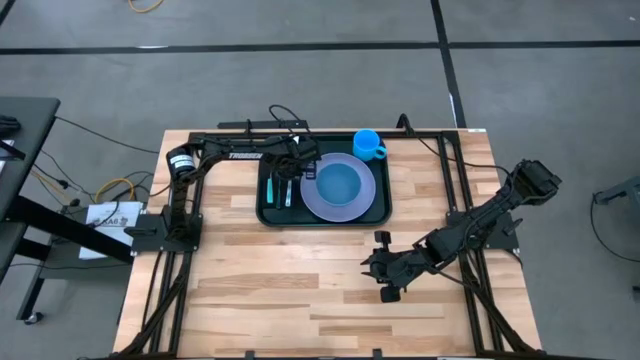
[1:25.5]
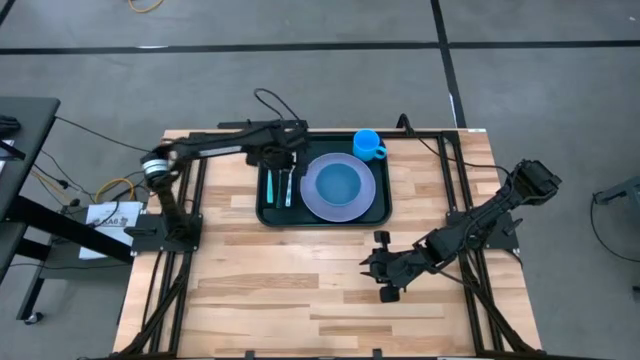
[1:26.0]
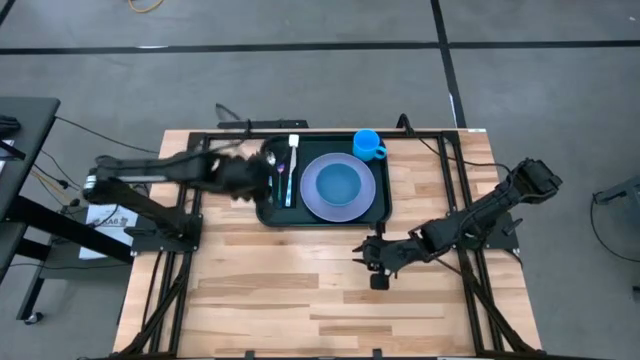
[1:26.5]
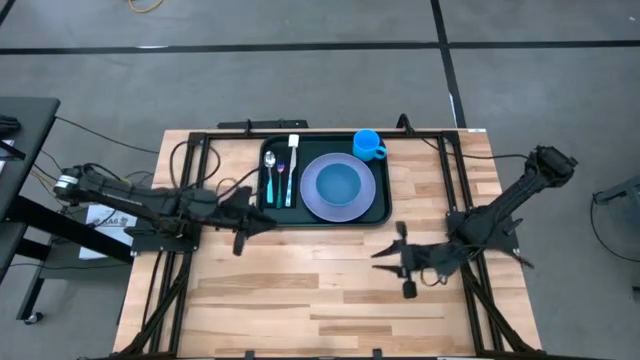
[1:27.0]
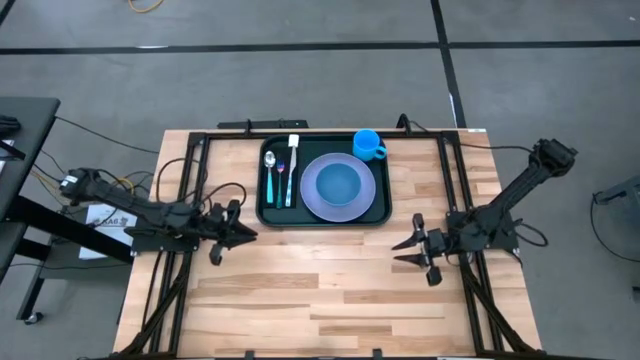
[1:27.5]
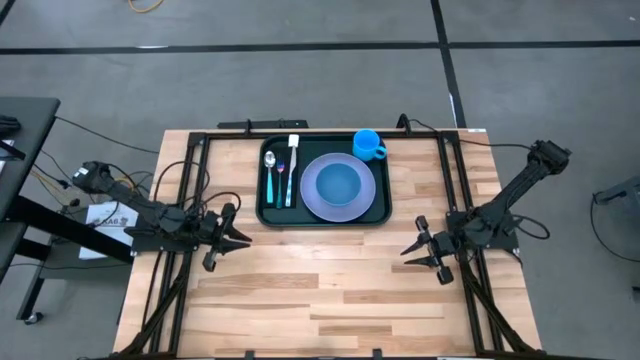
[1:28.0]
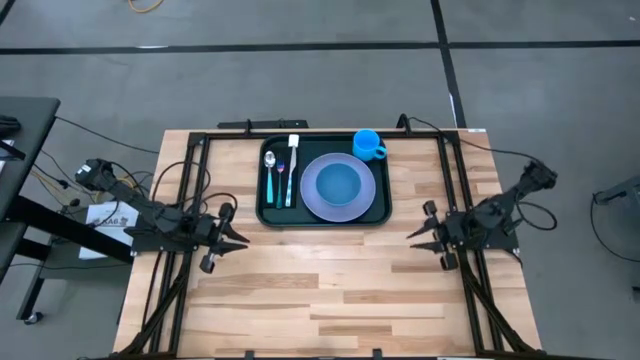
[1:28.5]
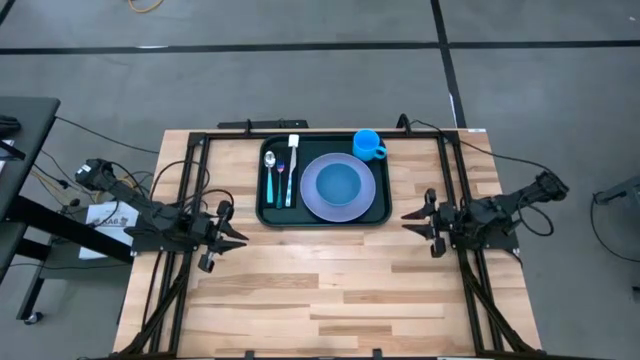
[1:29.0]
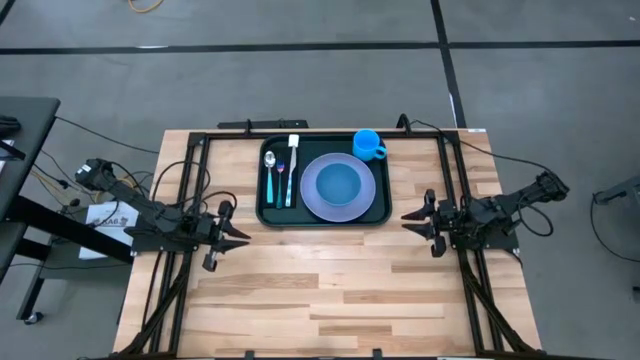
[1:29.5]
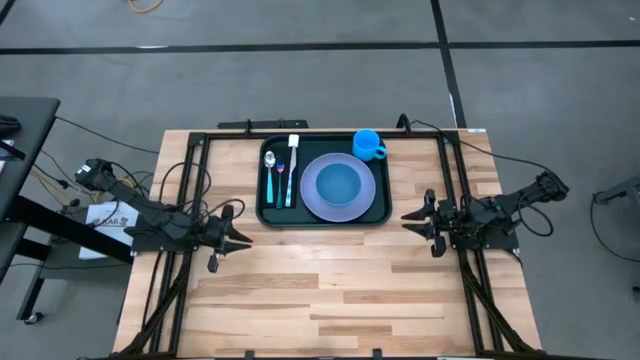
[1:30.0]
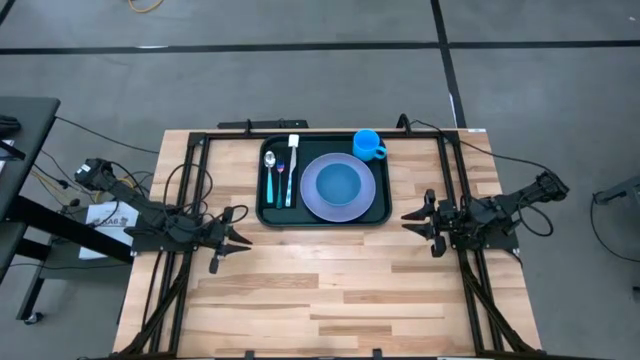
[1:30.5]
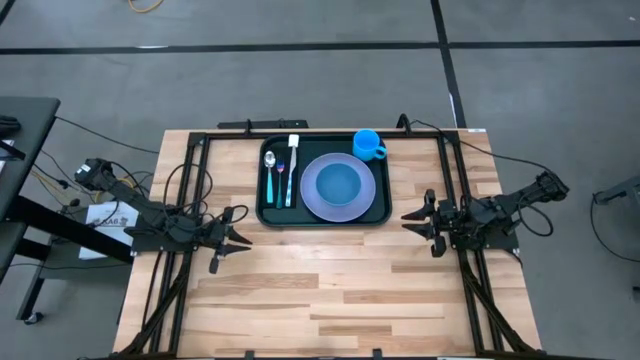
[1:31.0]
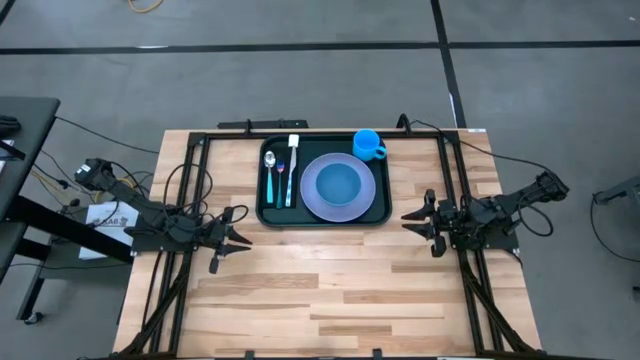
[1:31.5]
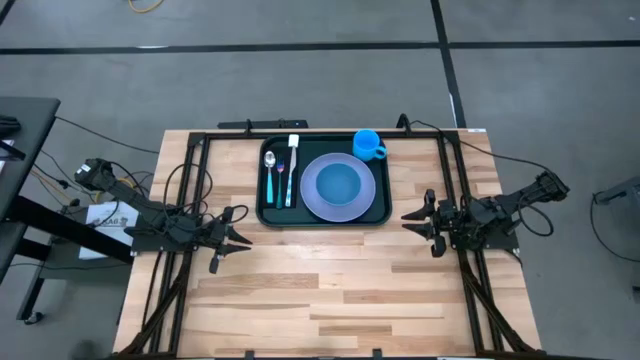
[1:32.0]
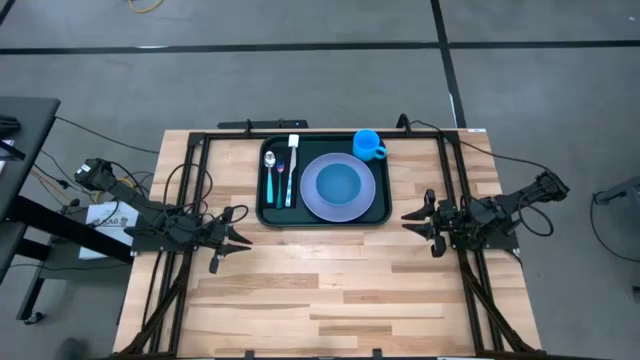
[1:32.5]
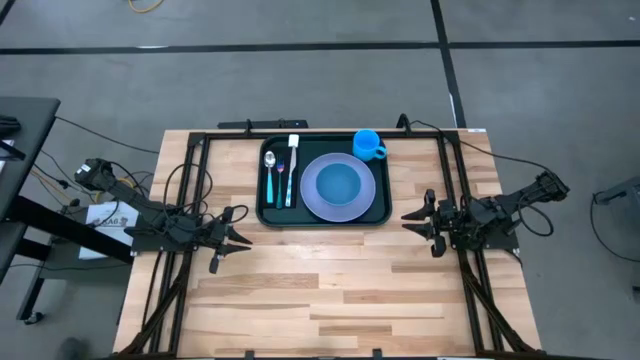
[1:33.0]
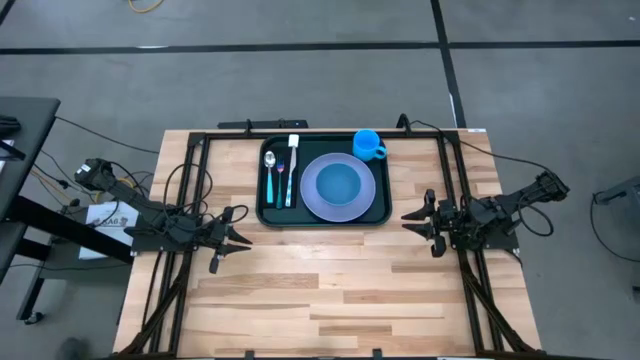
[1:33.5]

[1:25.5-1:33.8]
Task: Set up tray
Return to Home Position

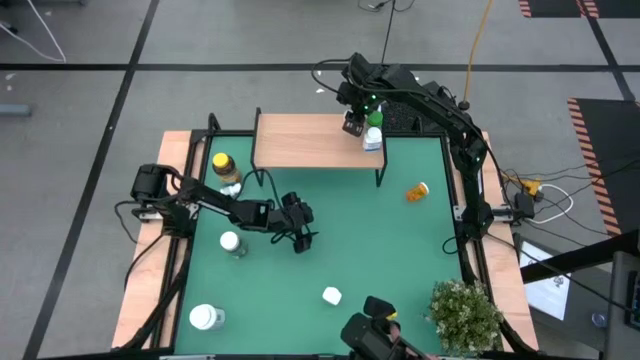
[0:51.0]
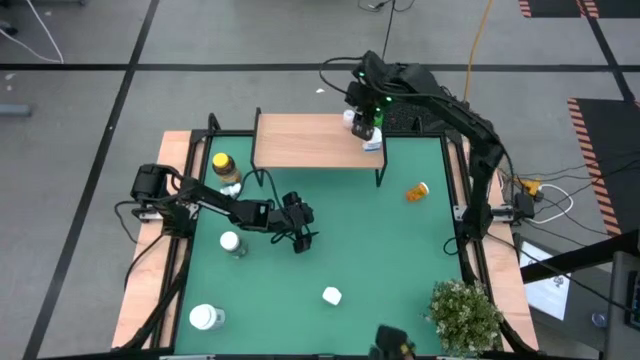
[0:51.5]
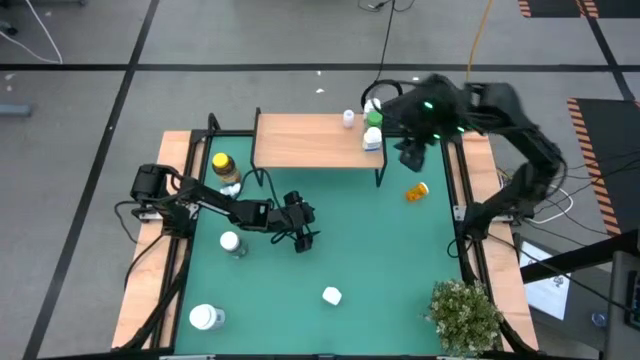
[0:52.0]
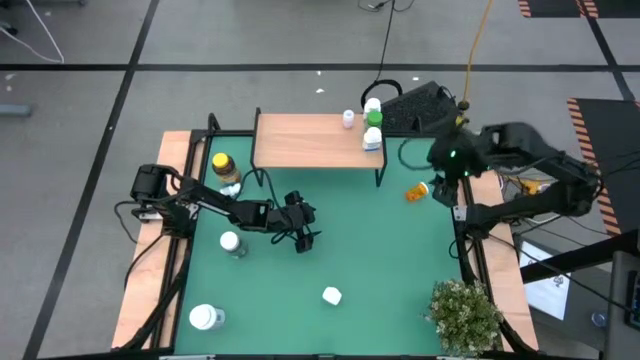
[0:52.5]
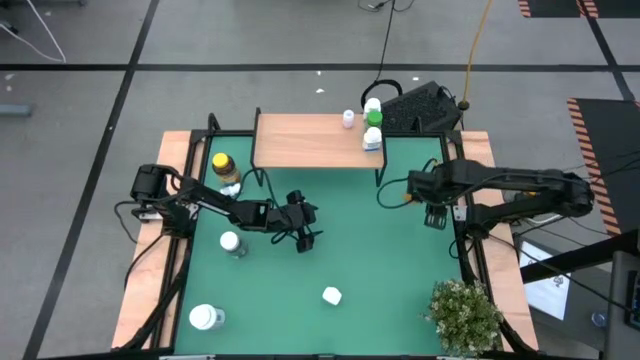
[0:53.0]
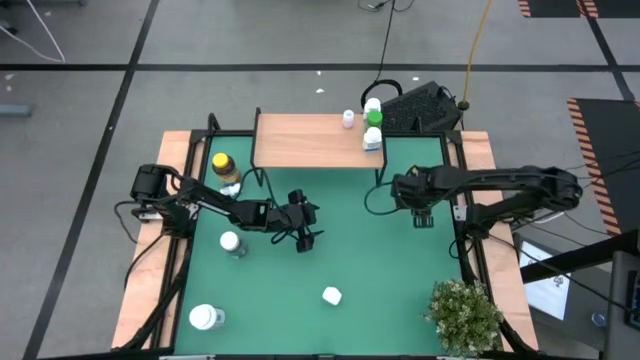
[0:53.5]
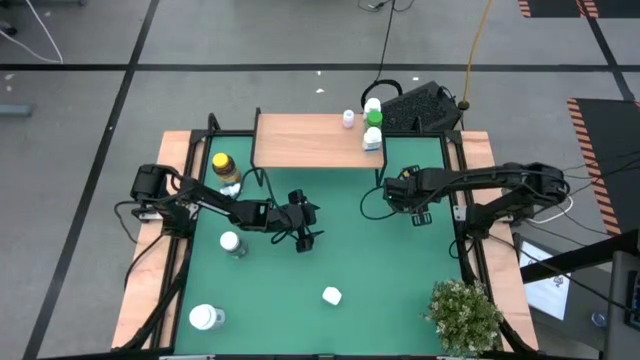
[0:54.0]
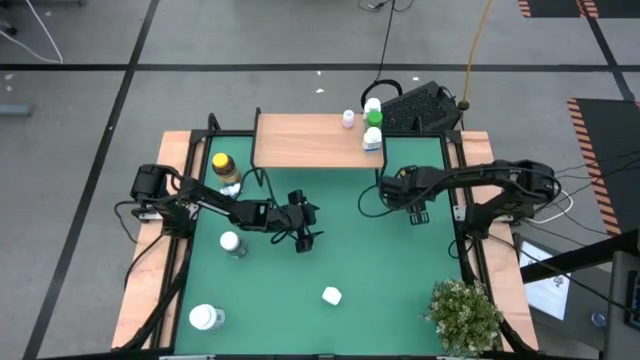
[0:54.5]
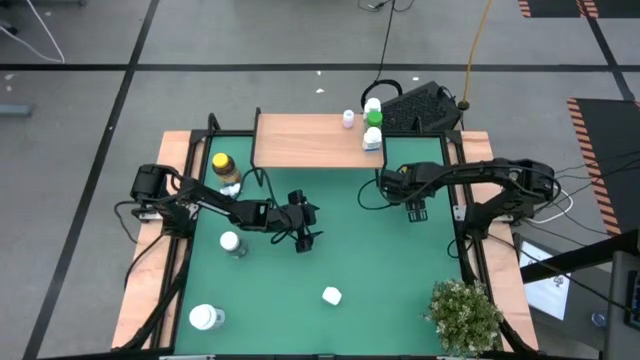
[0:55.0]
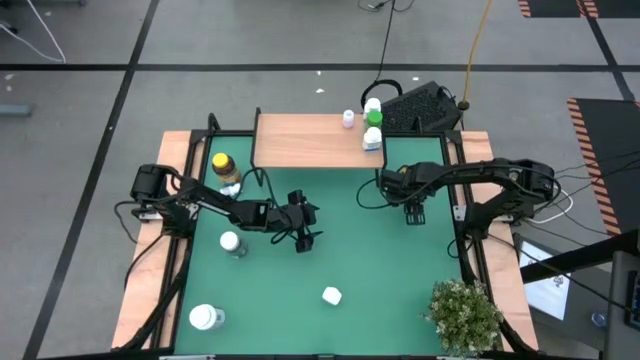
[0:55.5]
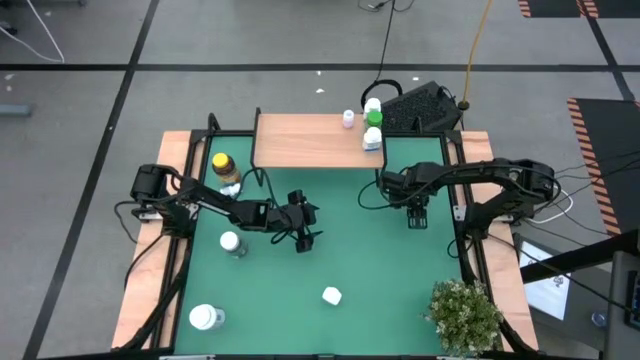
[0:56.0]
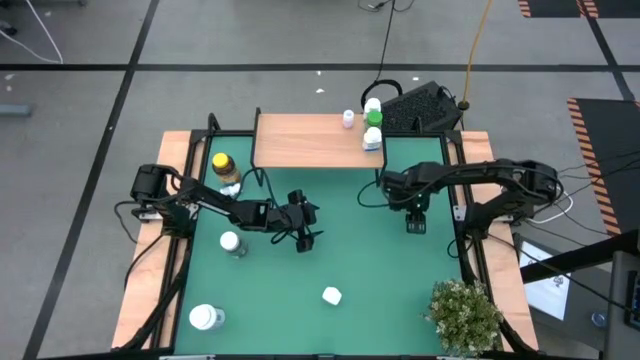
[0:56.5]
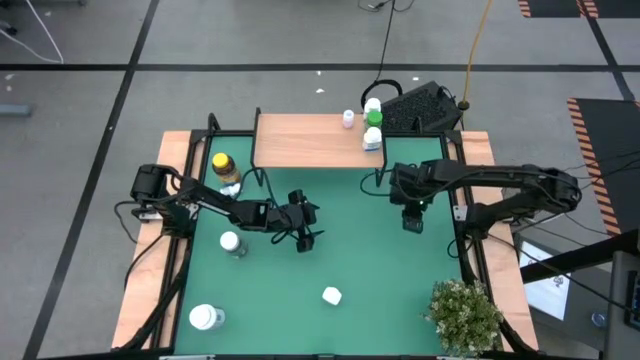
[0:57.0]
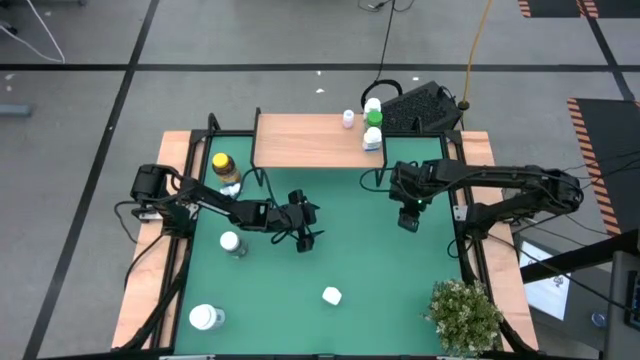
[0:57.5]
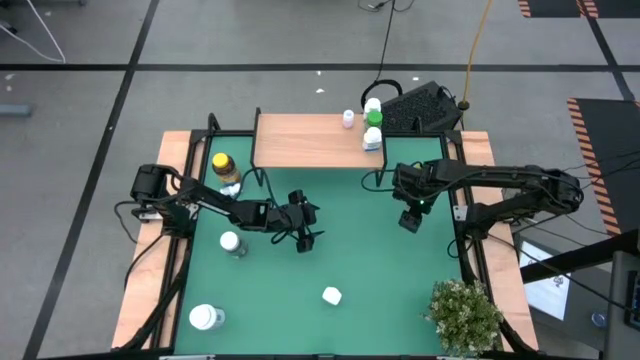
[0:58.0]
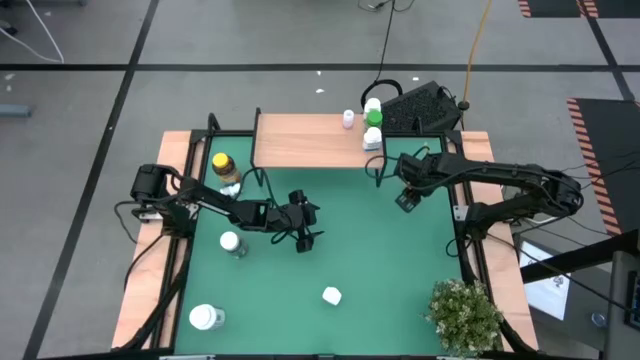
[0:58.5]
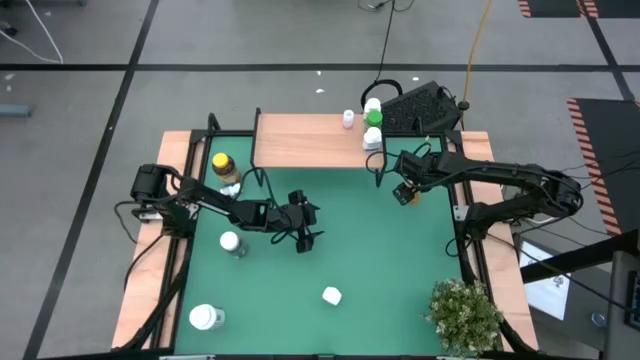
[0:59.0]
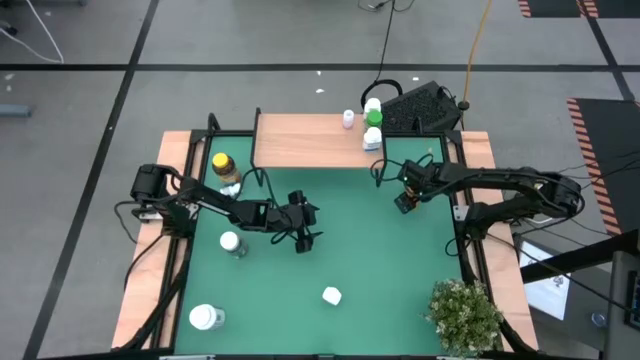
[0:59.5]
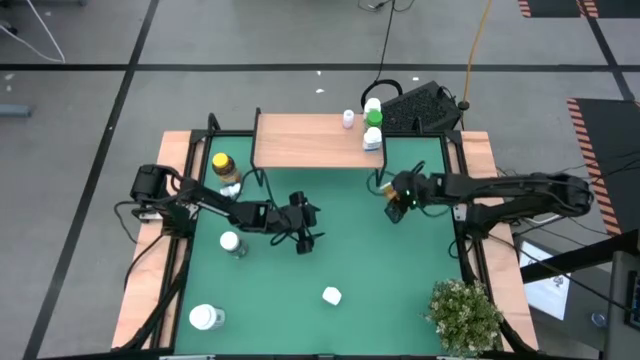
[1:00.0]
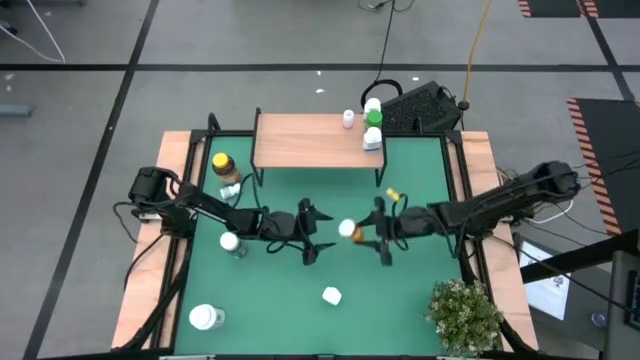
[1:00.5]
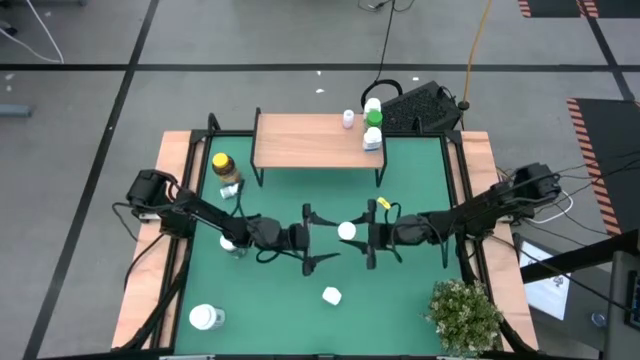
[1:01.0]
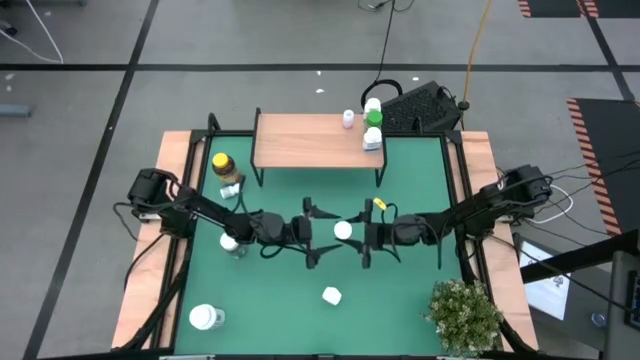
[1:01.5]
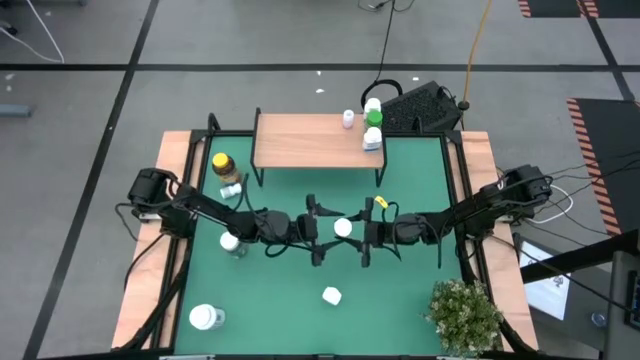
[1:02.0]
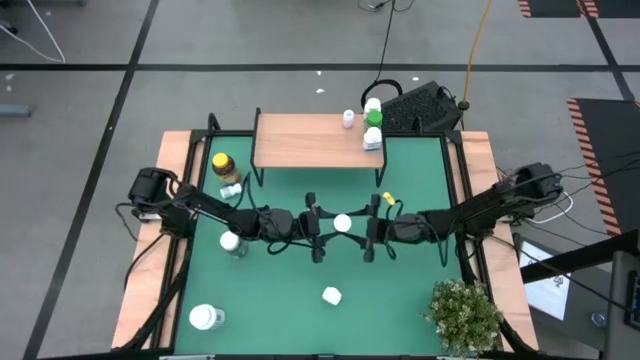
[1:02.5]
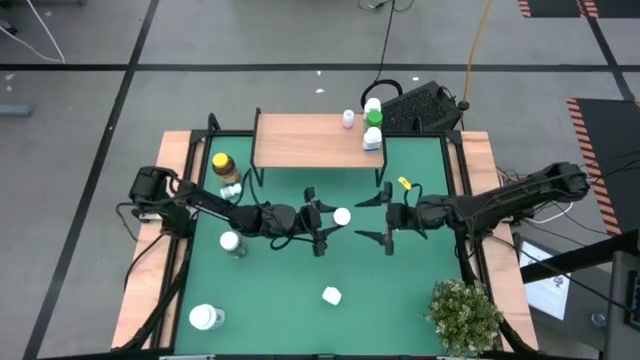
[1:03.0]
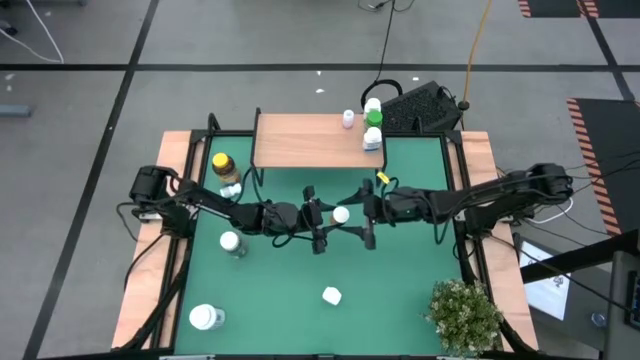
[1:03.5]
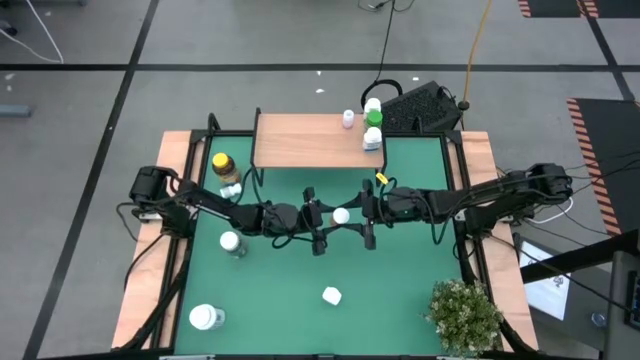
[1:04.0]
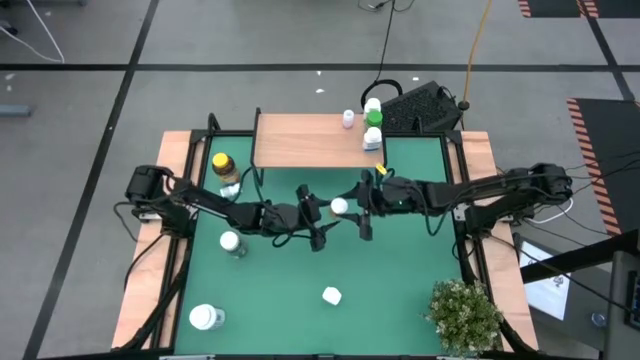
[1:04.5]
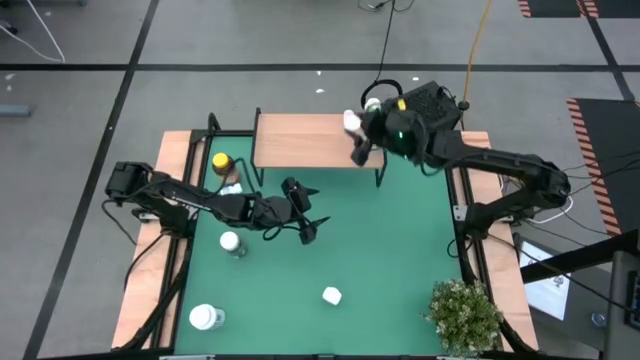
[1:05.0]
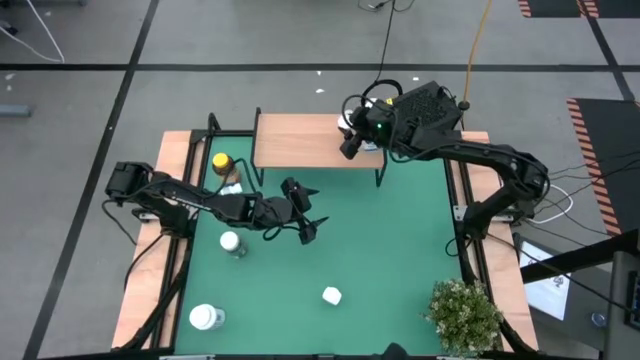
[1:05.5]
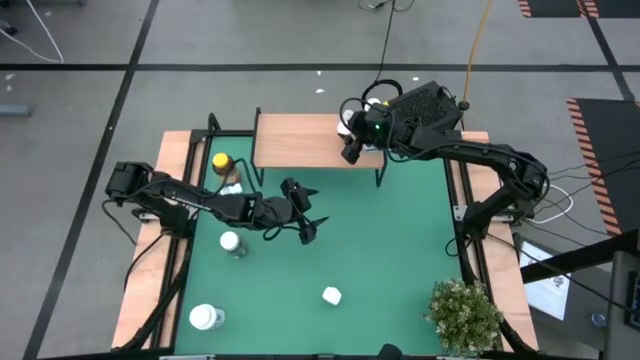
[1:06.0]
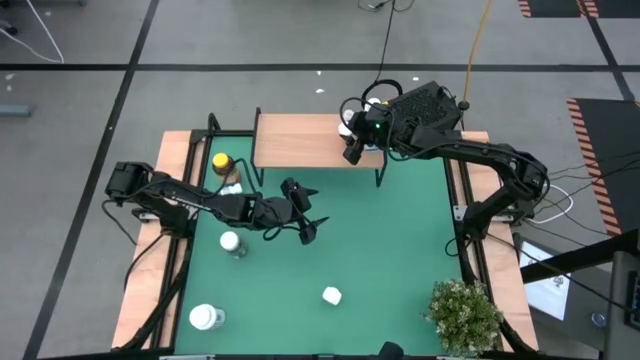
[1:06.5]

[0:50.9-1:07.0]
Task: Pick and place medicine bottles onto shelf by color
Put the orange pill bottle on the shelf
